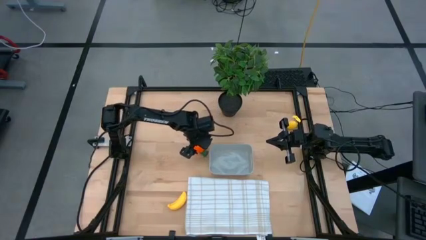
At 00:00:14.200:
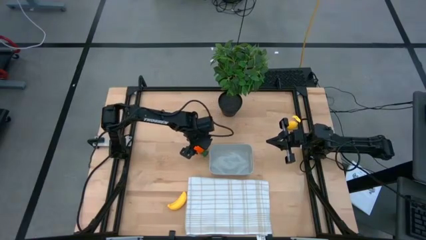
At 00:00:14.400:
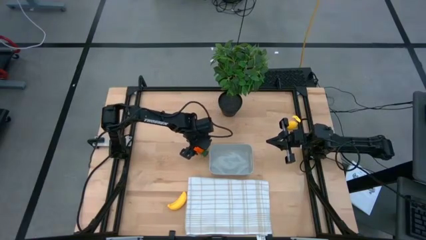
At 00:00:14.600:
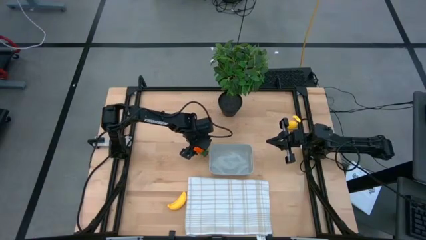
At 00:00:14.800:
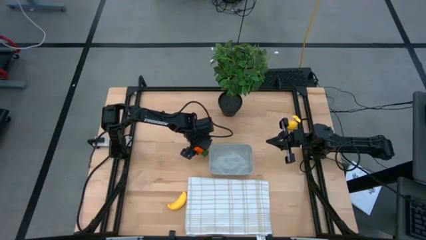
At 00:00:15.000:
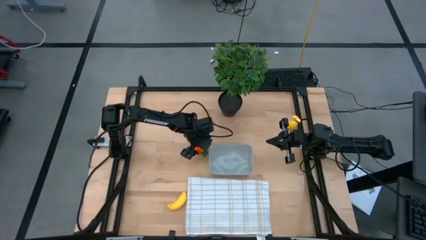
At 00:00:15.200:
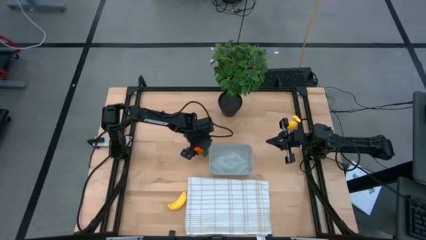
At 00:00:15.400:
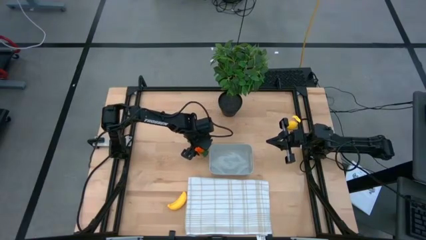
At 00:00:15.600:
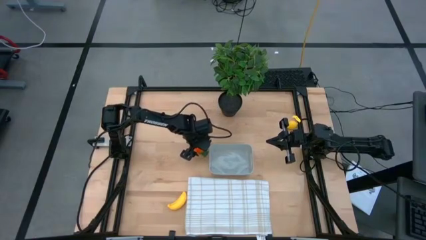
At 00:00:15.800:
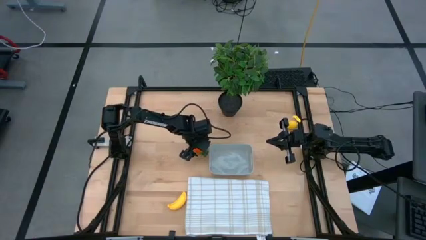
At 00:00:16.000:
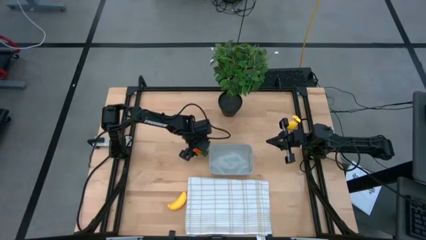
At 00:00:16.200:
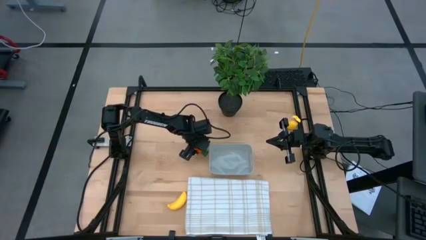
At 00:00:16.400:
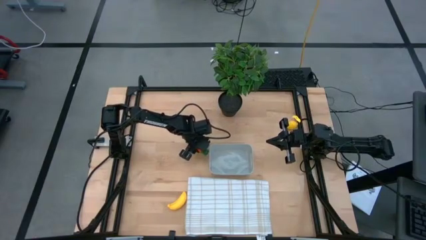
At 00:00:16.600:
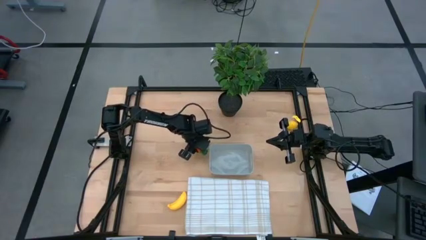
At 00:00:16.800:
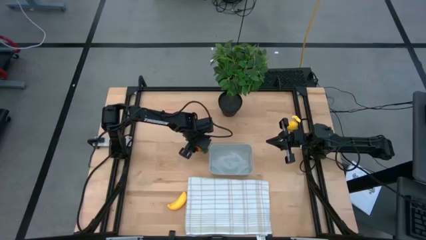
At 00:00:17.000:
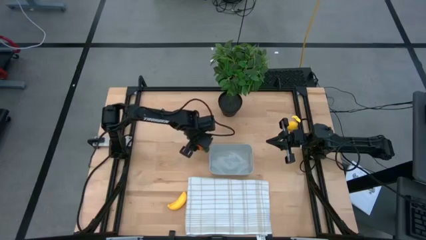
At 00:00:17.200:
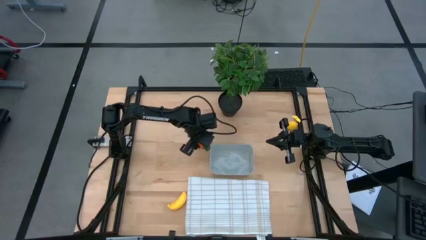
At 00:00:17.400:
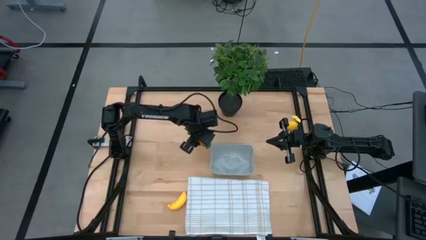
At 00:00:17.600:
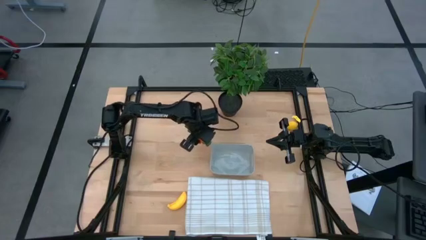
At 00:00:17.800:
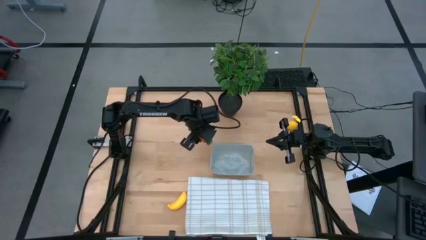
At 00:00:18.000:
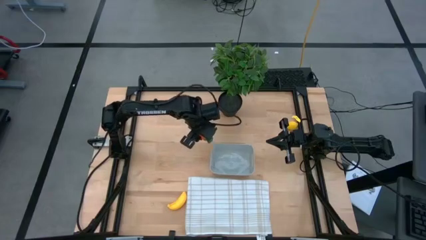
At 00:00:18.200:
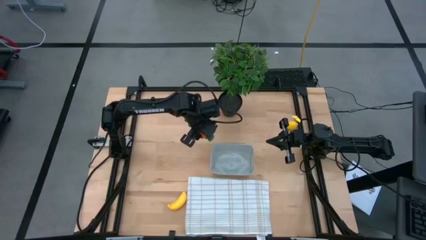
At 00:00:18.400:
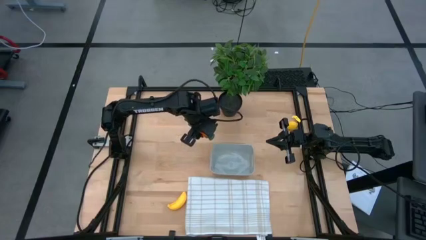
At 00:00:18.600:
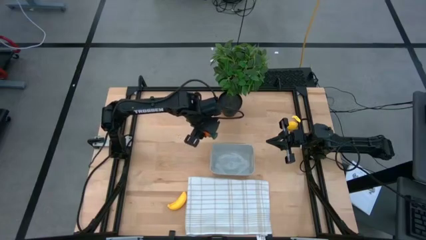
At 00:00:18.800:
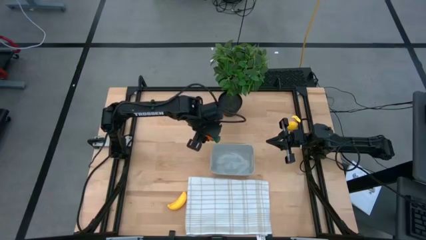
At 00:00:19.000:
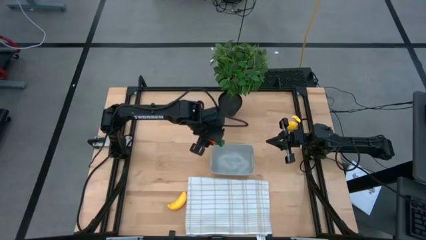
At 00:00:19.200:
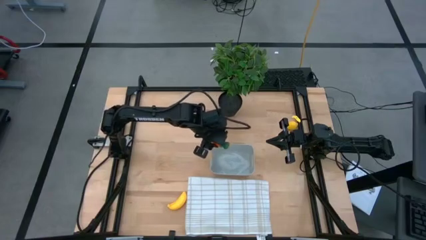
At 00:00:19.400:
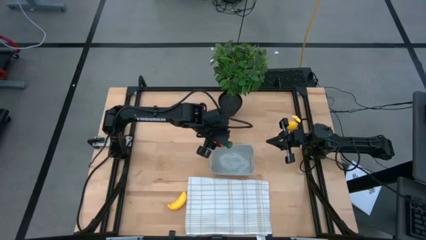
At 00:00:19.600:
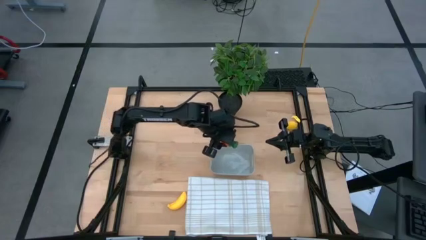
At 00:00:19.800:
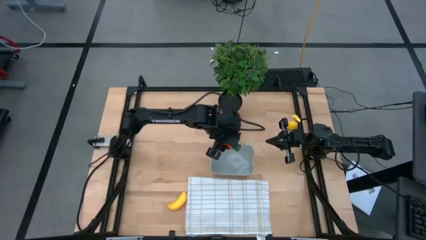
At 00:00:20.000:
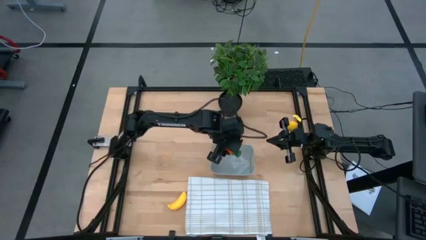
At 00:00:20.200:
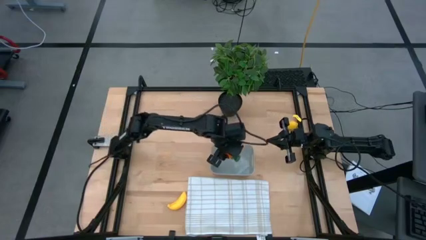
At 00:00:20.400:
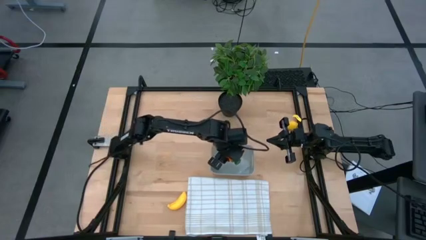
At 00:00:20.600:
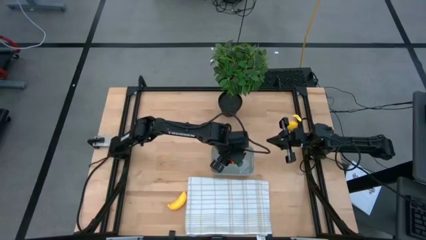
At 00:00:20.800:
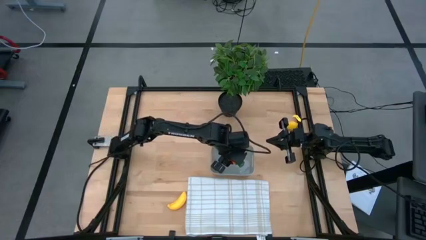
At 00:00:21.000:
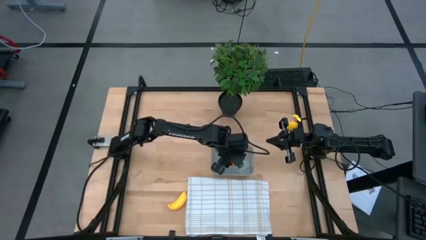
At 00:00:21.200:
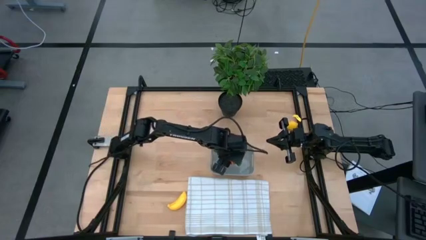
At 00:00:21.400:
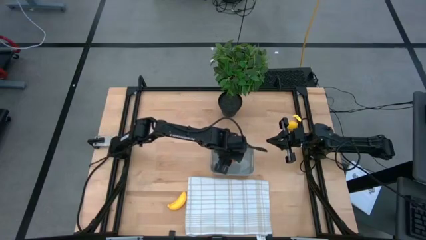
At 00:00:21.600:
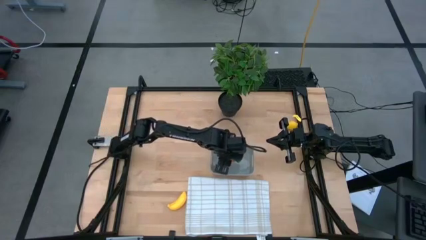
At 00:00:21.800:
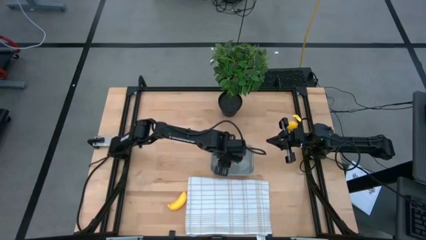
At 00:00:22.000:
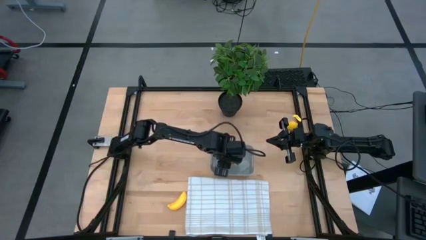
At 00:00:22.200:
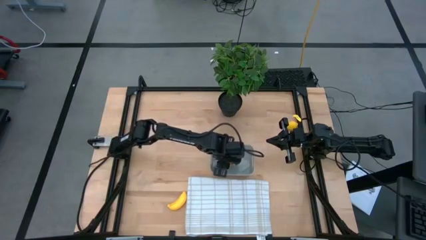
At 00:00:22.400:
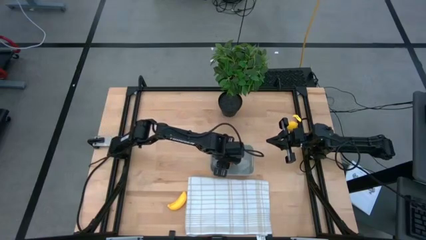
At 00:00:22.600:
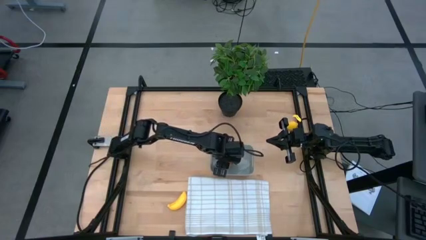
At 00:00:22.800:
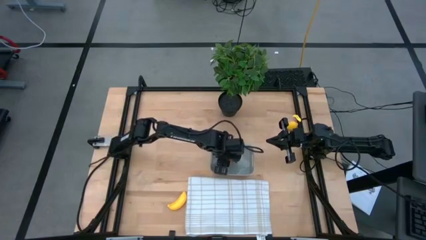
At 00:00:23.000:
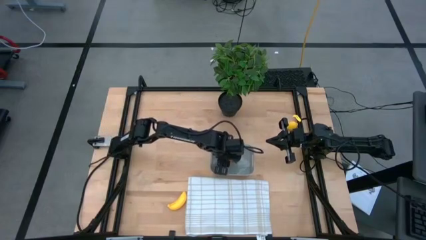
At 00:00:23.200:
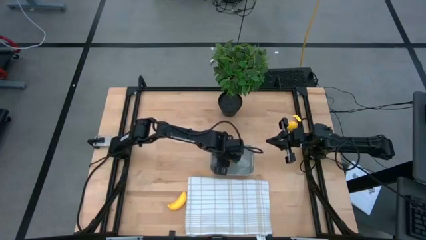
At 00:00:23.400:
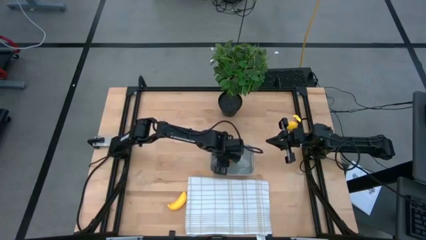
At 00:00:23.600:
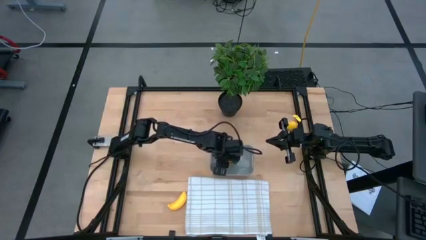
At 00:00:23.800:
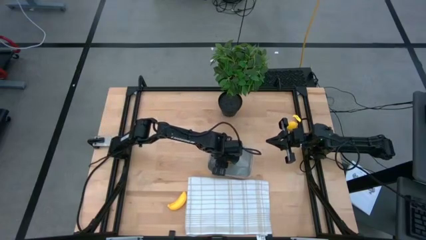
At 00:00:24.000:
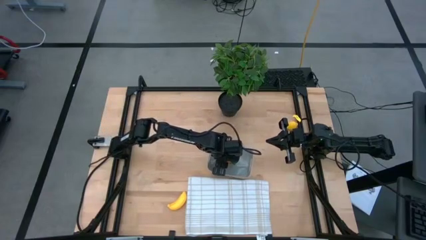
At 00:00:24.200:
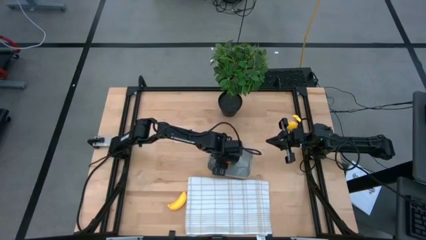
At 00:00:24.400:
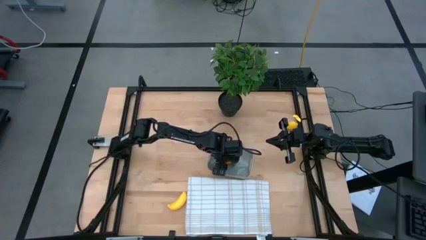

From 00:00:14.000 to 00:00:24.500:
Task: Pick and placing Produce into tupperware
Put the carrot into the bin

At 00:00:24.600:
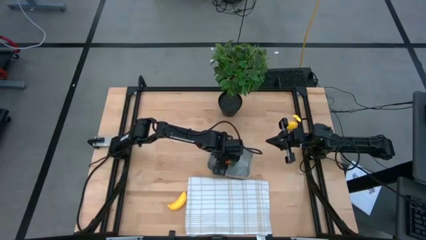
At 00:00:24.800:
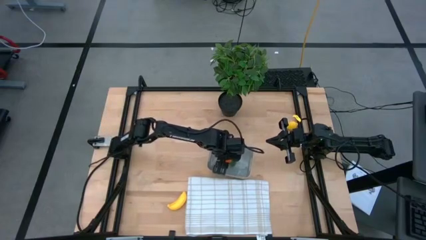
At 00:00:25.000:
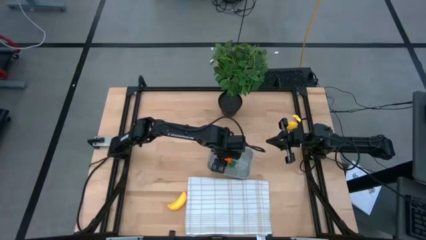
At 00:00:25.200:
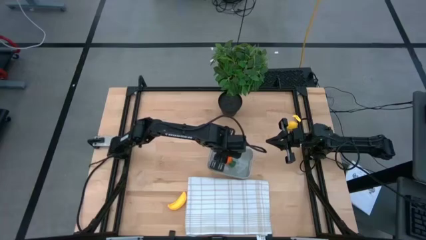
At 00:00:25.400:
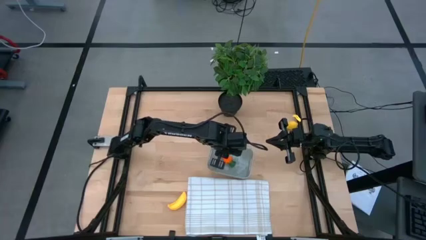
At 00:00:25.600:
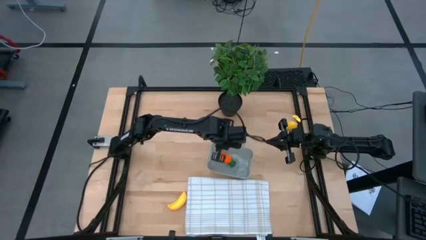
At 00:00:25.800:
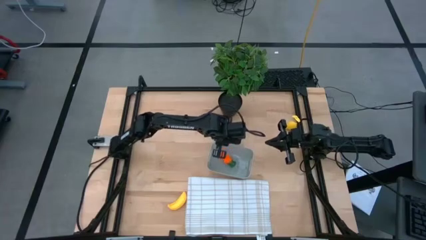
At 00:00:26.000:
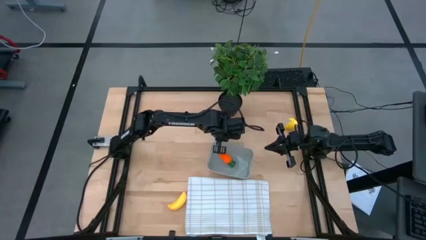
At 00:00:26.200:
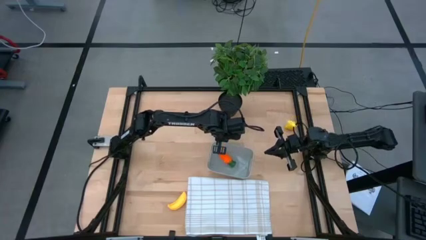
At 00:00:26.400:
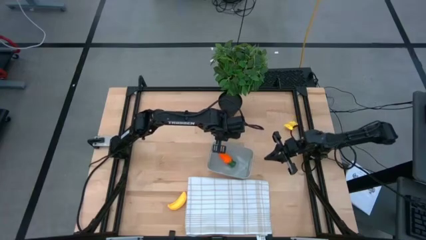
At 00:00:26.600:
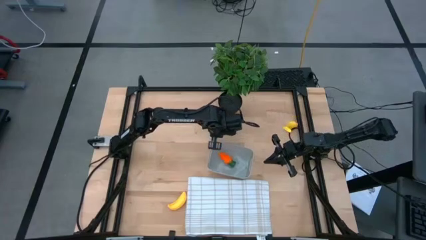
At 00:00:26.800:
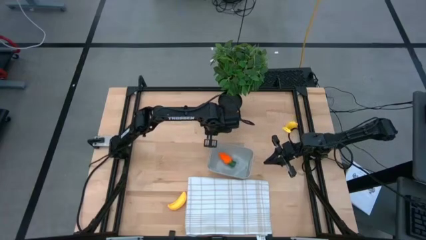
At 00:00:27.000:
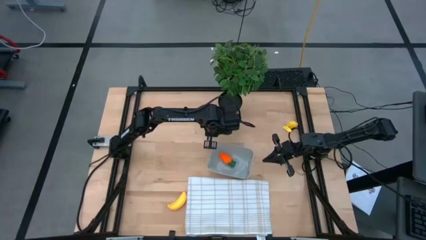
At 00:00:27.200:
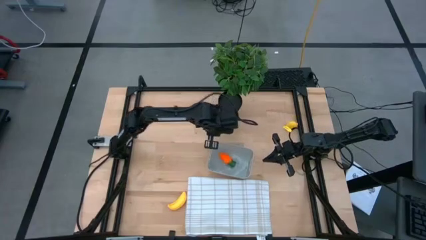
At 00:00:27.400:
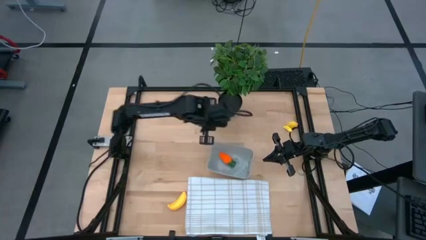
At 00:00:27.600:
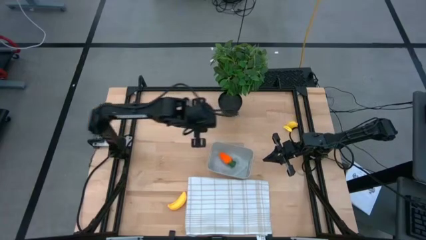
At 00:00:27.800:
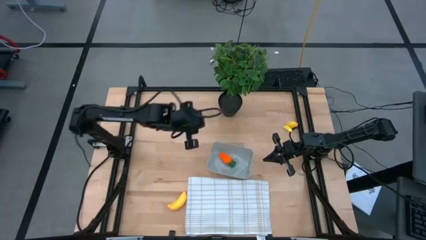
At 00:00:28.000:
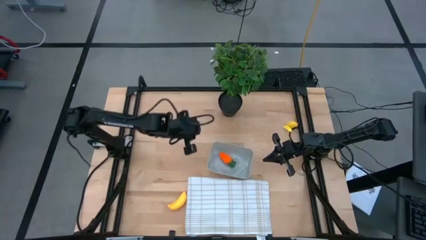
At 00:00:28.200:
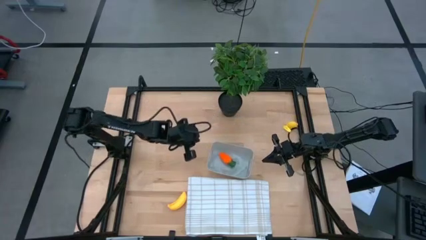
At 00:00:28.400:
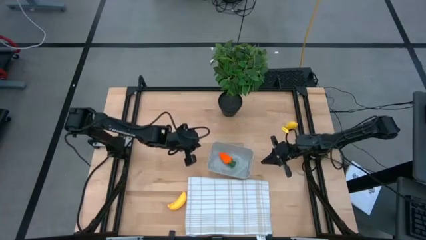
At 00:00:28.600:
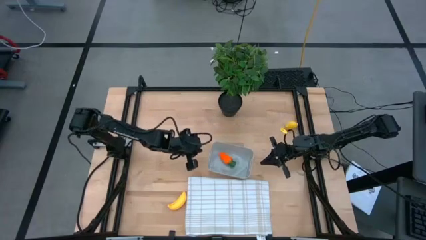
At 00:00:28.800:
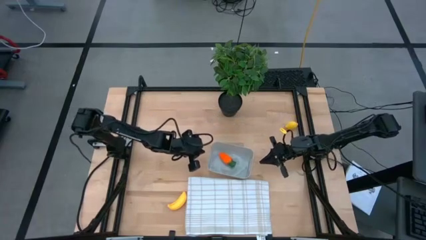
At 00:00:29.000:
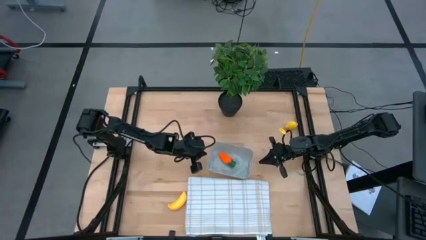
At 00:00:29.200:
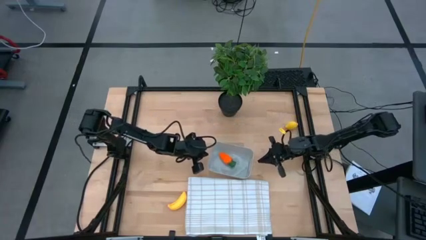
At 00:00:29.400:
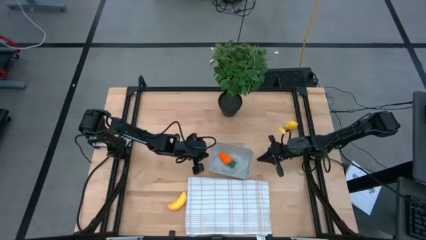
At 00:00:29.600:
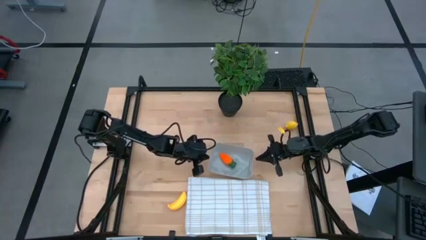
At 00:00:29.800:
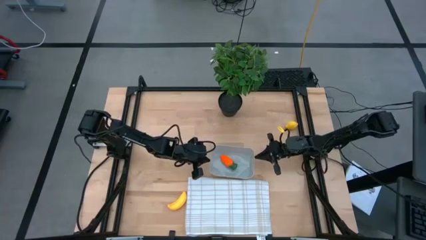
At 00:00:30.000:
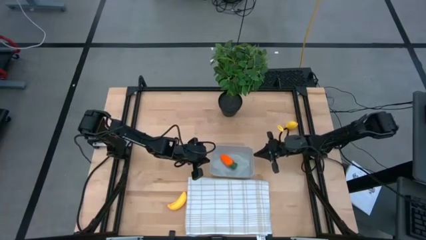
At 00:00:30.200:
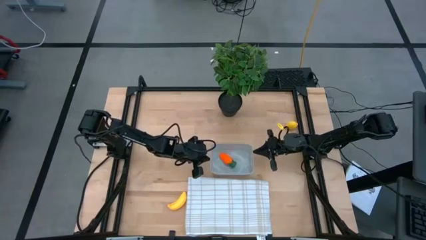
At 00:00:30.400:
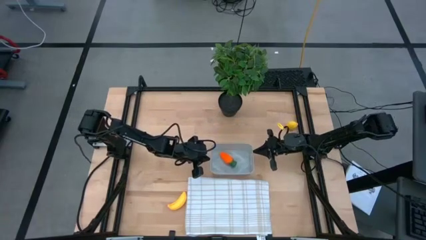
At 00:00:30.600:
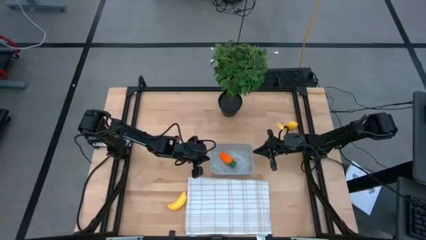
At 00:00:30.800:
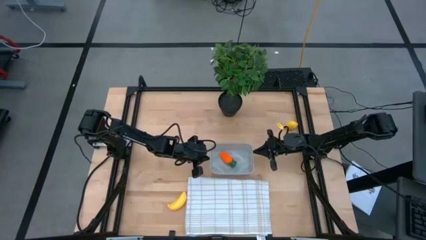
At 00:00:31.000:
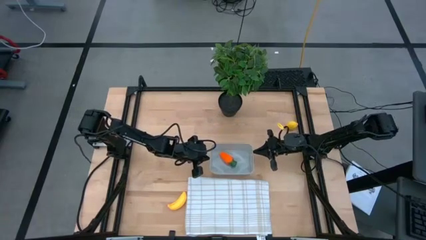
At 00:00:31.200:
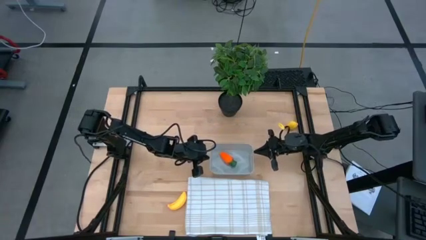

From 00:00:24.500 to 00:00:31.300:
Adjust the bin
